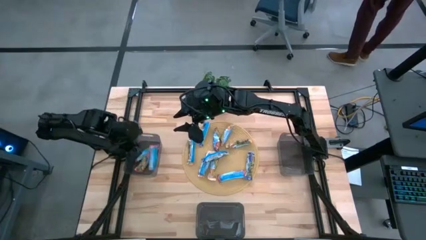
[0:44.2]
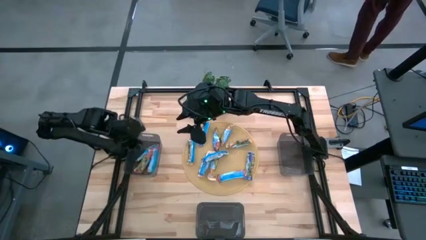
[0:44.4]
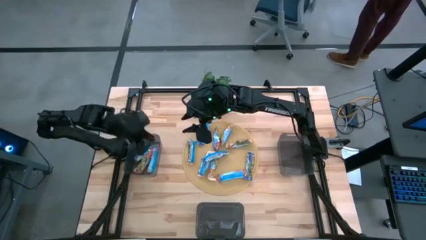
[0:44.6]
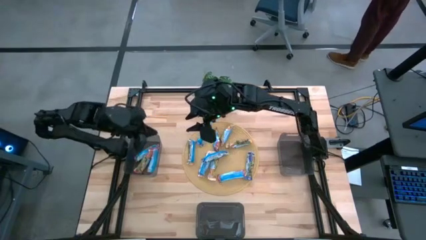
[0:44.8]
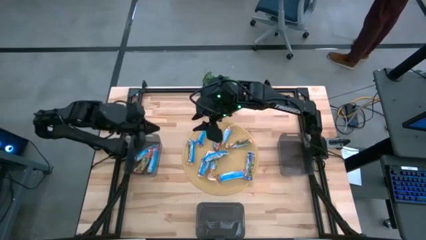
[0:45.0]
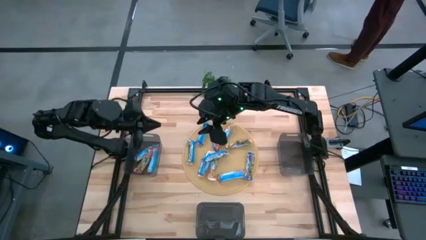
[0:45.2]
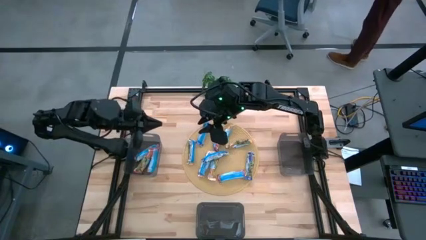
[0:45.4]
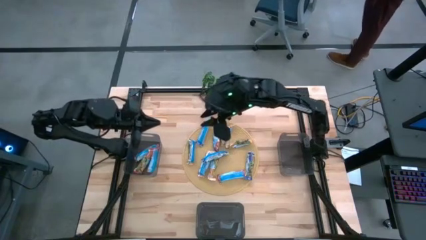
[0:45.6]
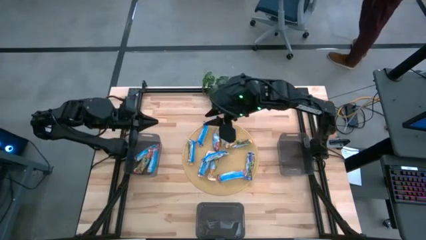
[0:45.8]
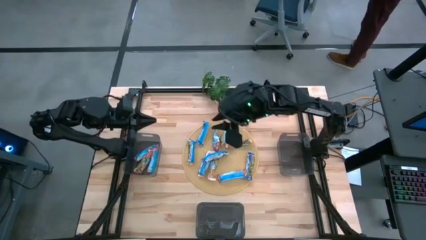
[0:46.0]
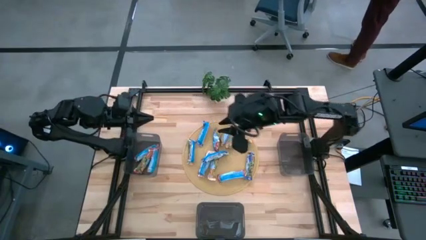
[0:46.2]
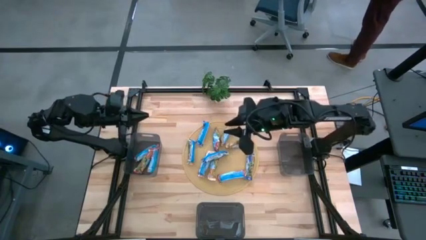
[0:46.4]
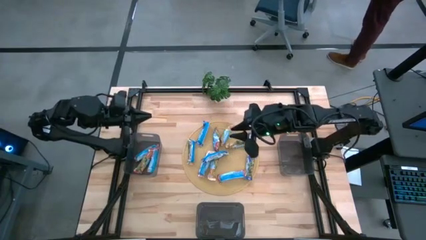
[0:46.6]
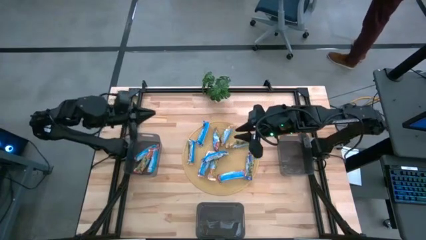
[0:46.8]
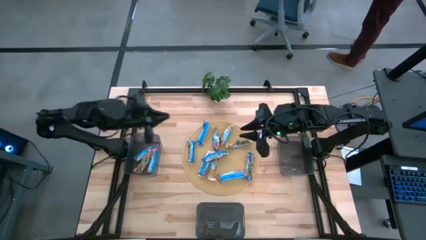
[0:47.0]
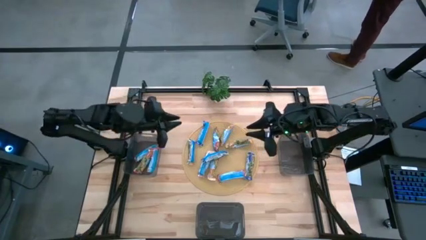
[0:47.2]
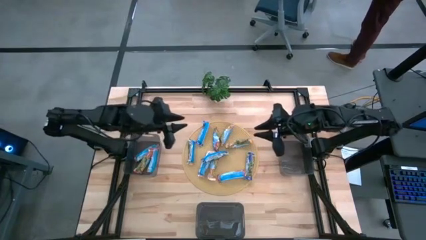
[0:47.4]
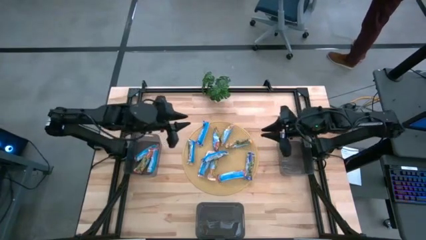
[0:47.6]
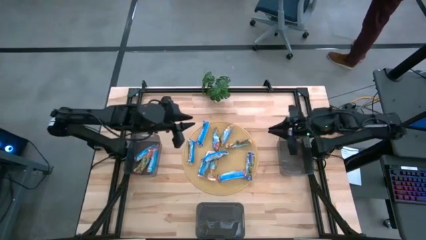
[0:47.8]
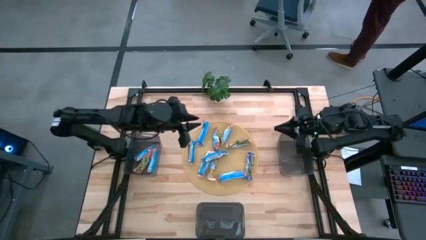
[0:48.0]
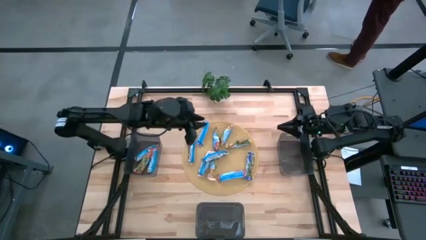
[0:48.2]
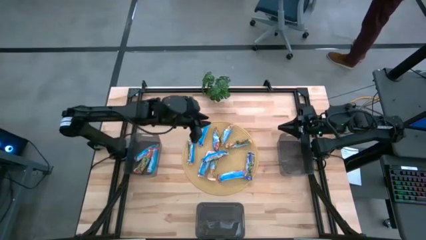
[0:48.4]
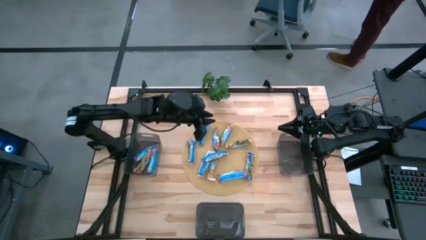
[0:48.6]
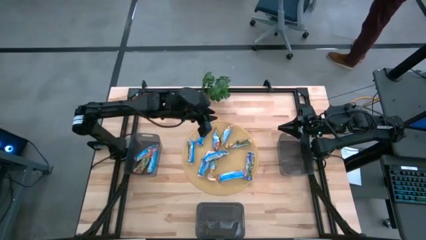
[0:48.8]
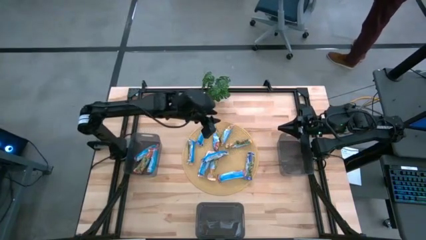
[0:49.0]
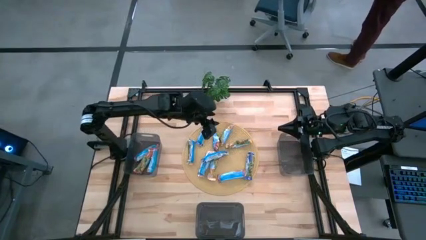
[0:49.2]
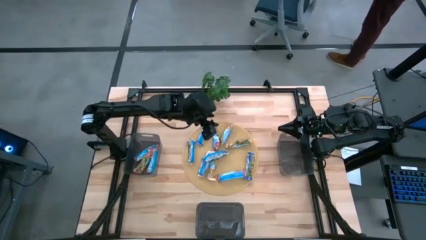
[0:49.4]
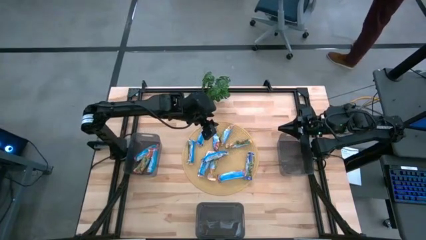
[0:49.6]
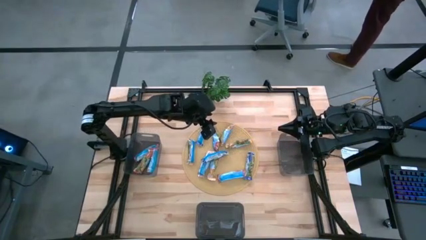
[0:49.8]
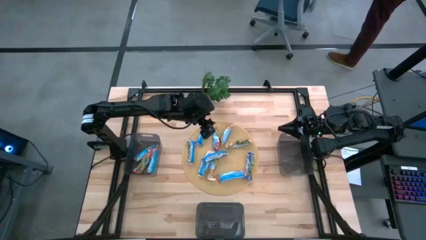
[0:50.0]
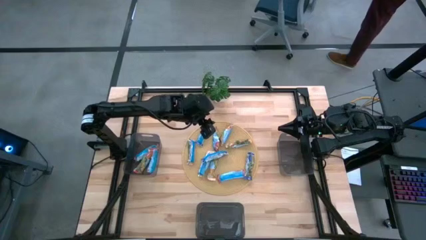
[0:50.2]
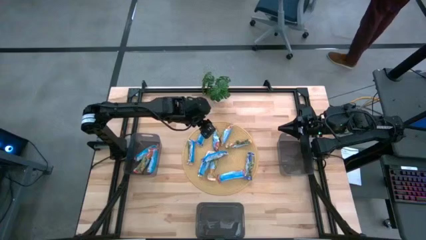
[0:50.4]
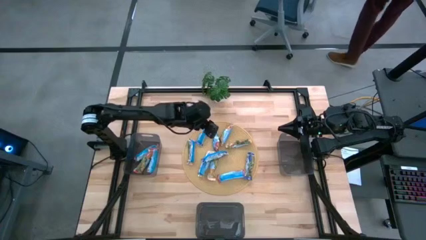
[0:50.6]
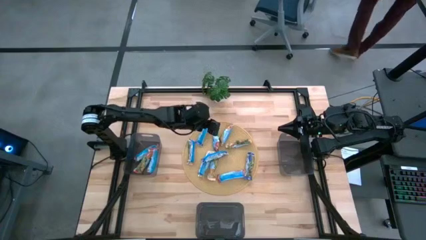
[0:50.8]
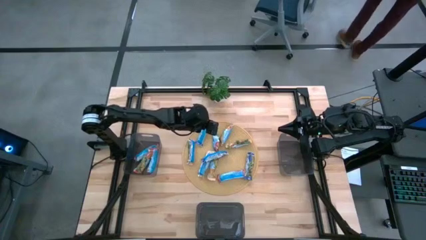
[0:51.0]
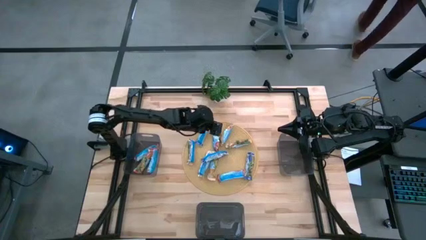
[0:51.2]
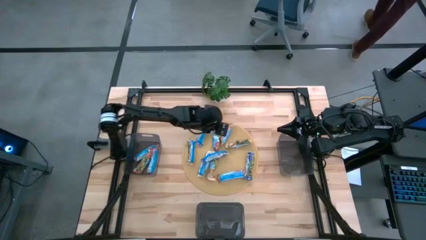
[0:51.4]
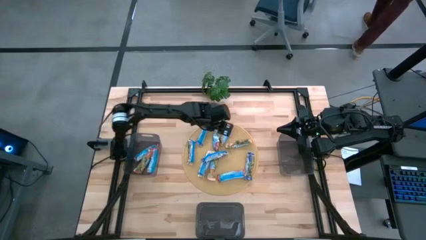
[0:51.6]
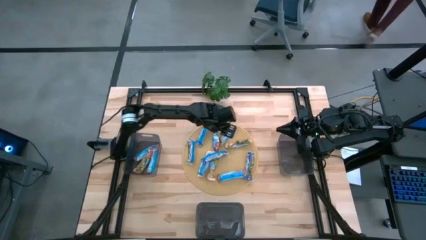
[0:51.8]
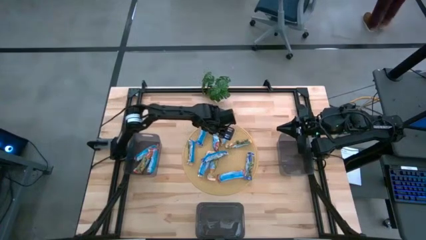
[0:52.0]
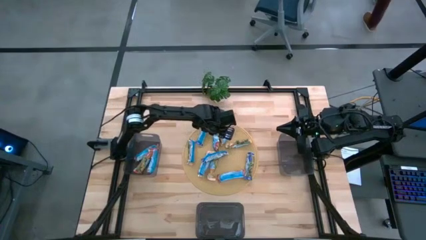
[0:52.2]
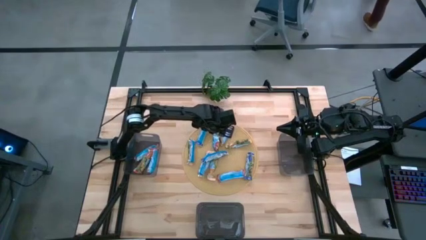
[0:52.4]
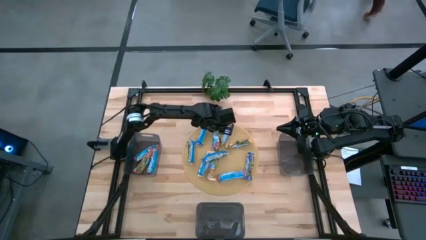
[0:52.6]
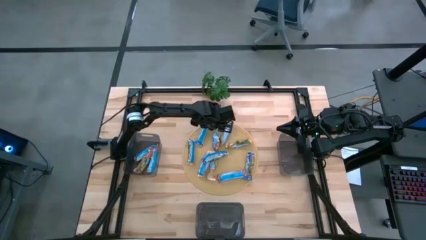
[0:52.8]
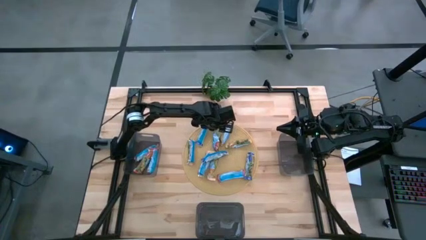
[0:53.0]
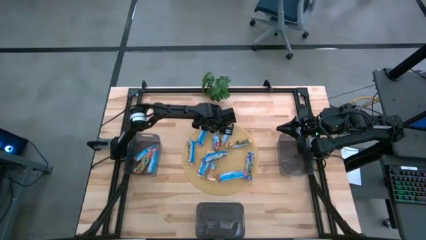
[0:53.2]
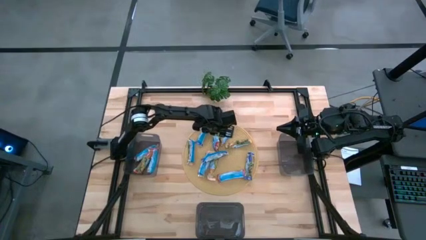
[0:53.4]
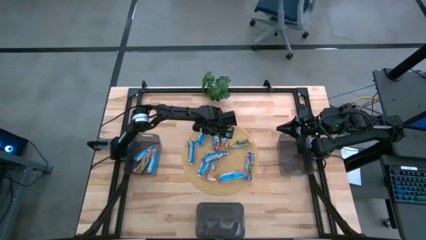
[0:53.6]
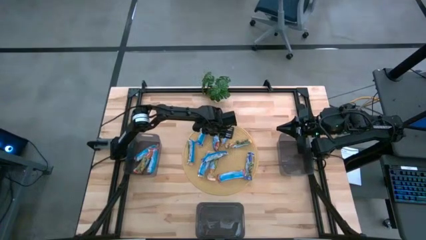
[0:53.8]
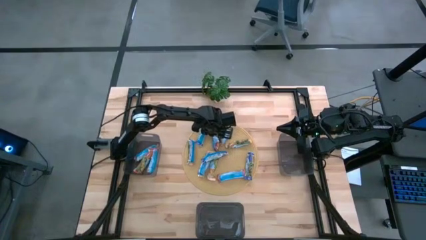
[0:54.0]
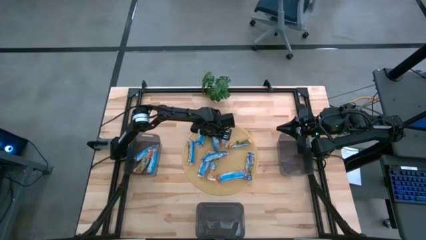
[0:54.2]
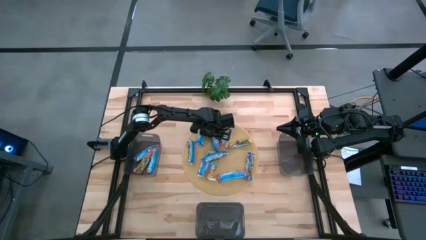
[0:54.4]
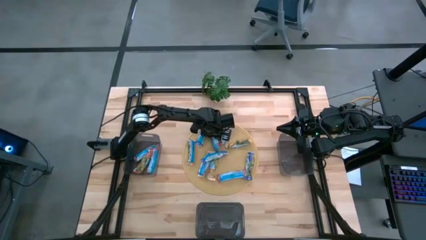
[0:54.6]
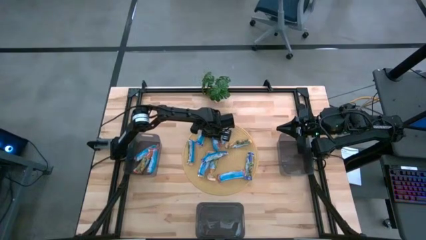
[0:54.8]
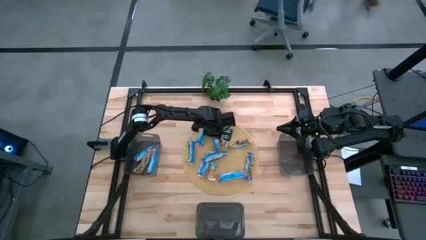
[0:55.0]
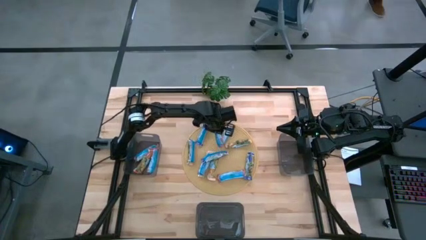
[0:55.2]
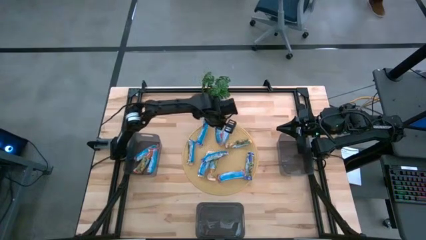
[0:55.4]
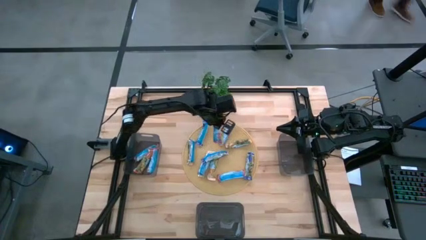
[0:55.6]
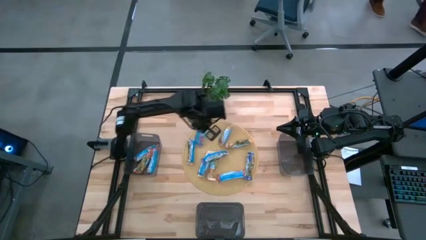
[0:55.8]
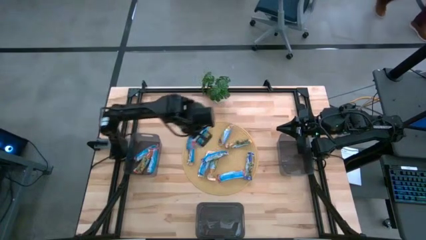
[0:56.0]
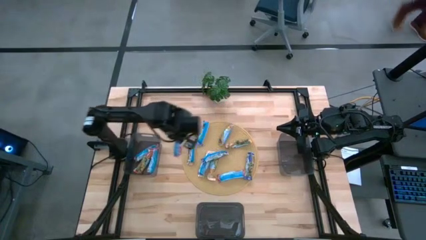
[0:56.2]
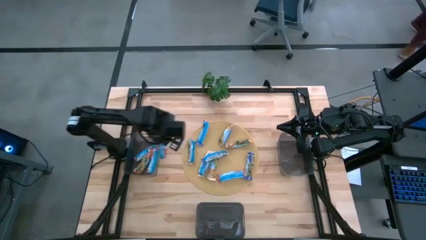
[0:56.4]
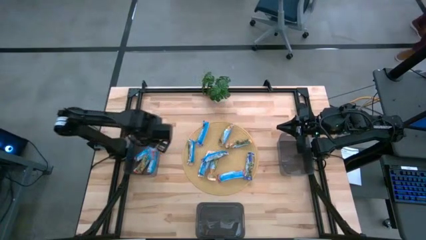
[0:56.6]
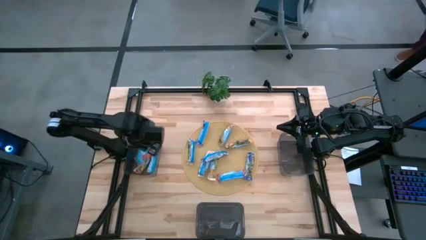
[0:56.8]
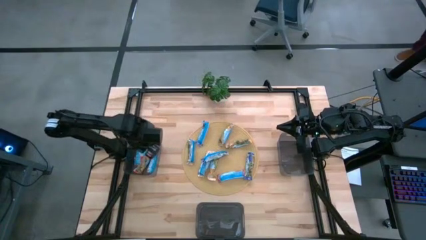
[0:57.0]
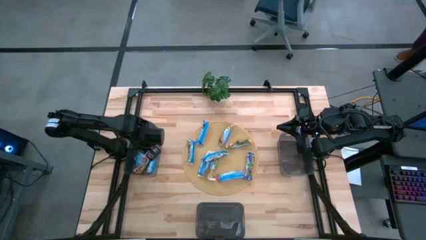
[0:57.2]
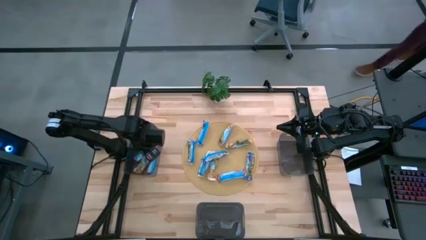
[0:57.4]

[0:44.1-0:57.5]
Task: Pick and place Granola Bars by type
Put the top red granola bar into the top left bin
